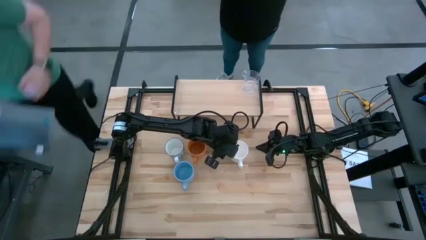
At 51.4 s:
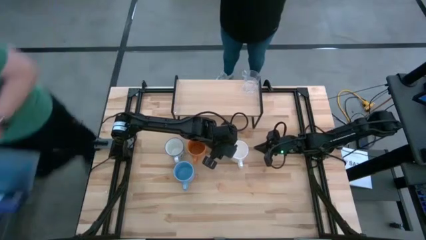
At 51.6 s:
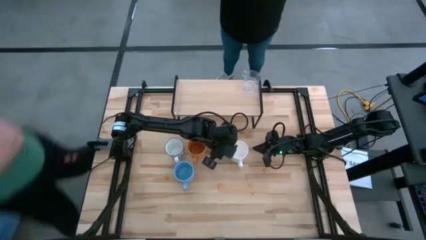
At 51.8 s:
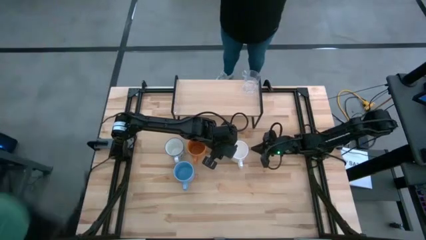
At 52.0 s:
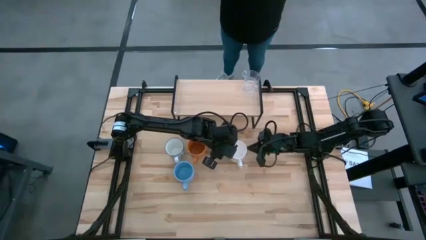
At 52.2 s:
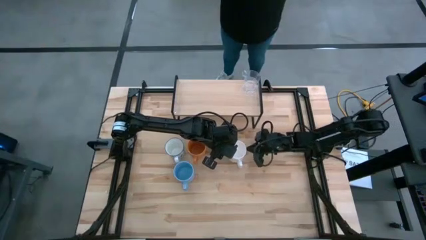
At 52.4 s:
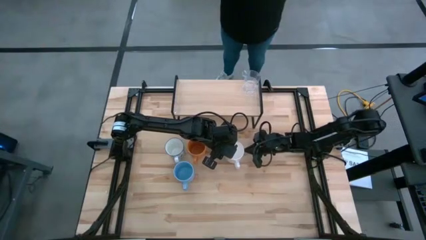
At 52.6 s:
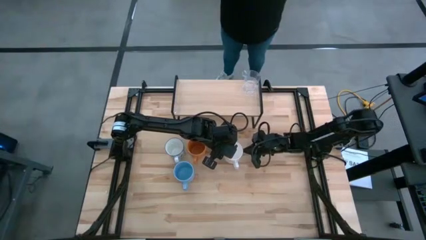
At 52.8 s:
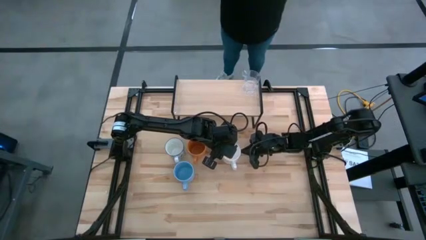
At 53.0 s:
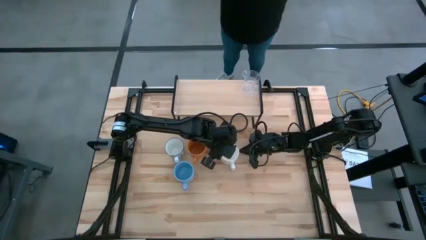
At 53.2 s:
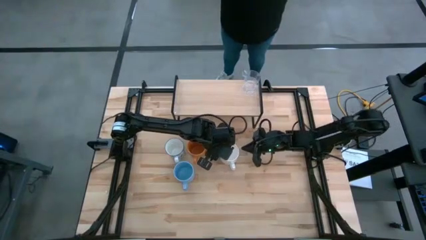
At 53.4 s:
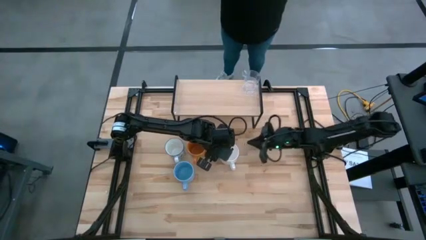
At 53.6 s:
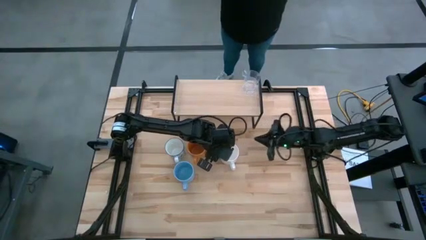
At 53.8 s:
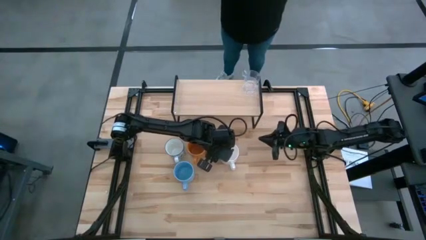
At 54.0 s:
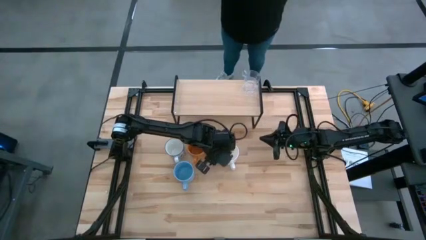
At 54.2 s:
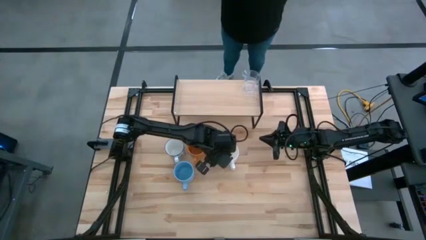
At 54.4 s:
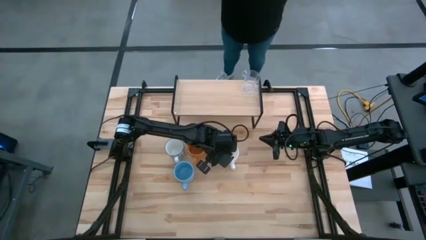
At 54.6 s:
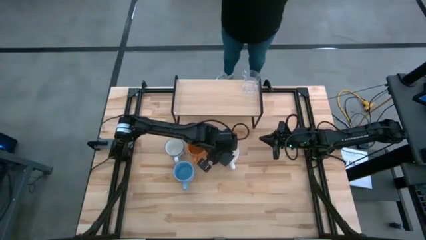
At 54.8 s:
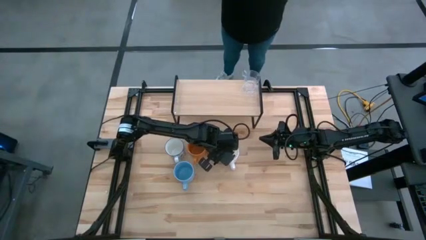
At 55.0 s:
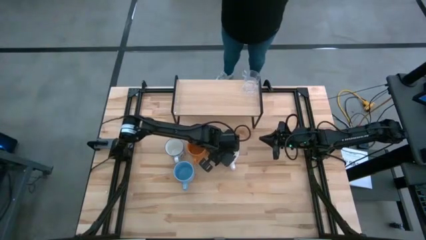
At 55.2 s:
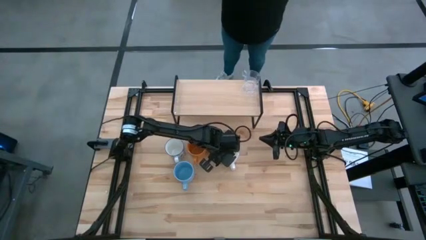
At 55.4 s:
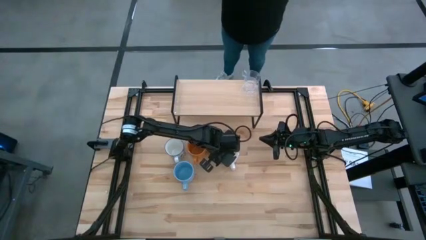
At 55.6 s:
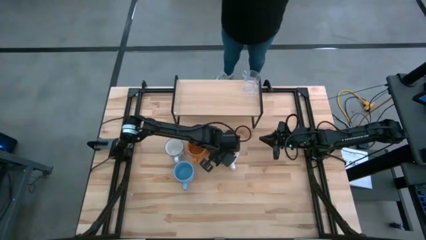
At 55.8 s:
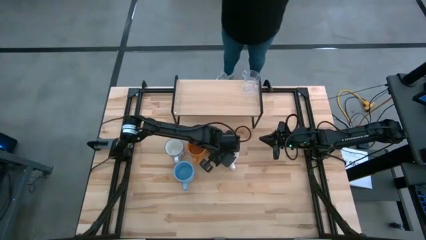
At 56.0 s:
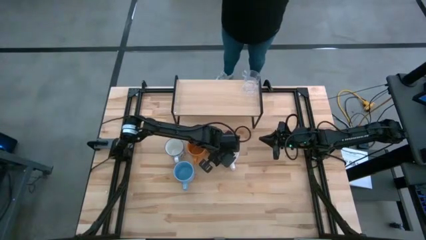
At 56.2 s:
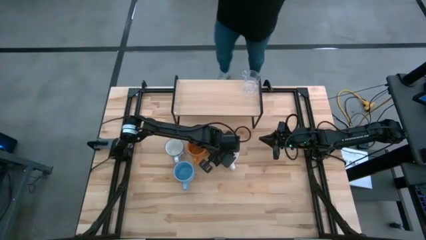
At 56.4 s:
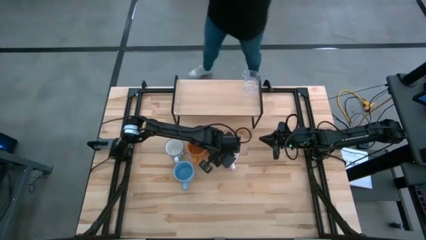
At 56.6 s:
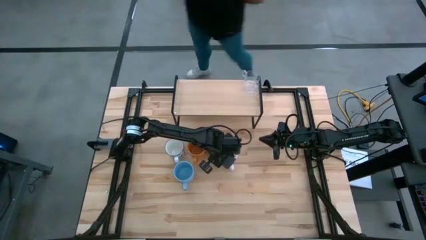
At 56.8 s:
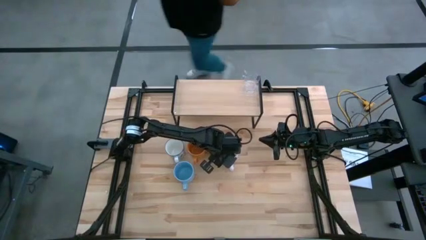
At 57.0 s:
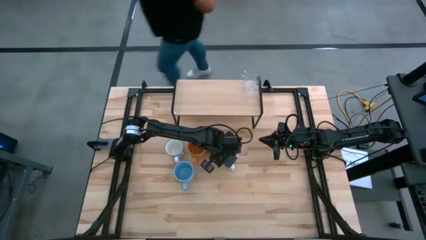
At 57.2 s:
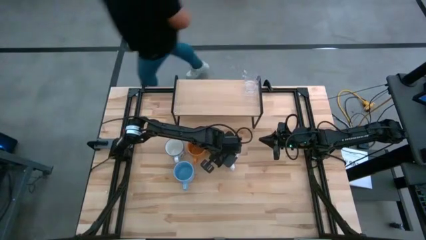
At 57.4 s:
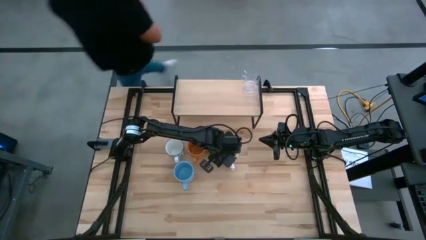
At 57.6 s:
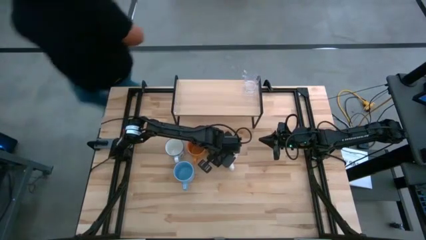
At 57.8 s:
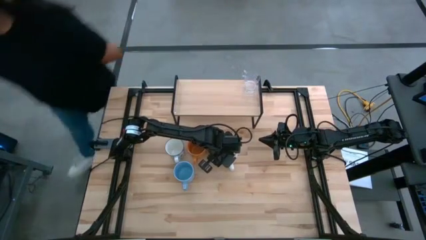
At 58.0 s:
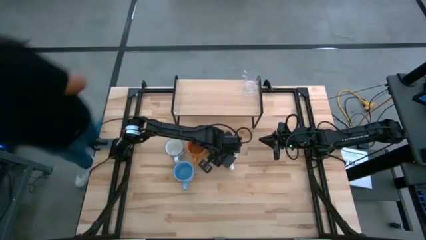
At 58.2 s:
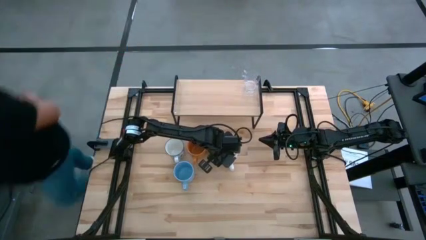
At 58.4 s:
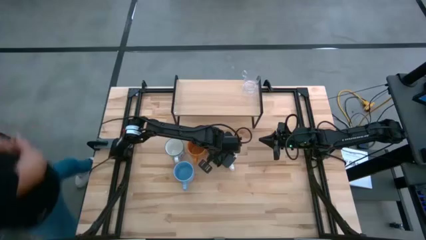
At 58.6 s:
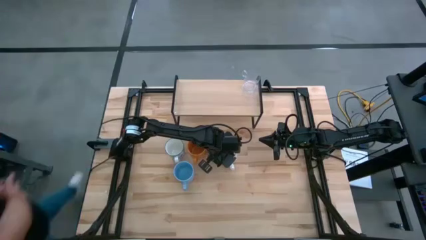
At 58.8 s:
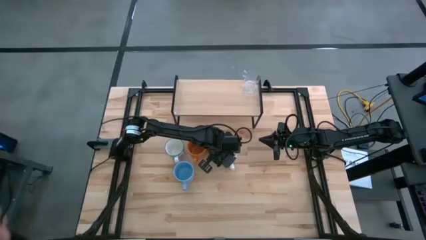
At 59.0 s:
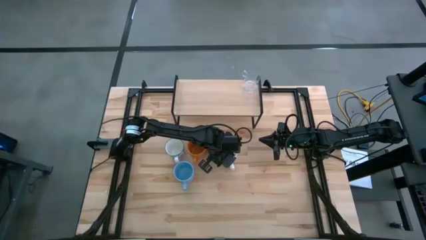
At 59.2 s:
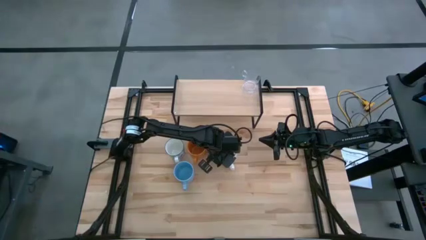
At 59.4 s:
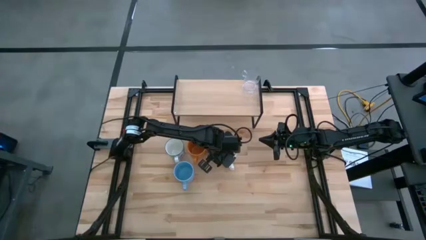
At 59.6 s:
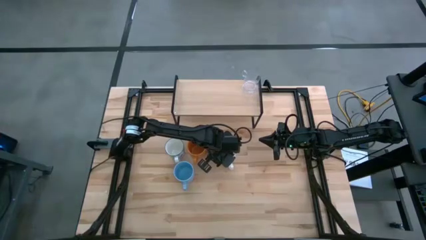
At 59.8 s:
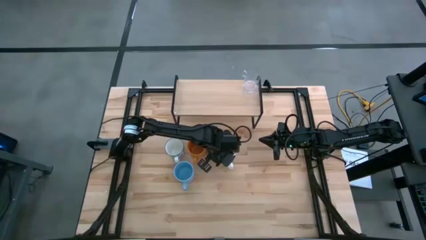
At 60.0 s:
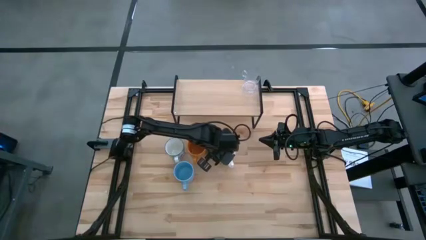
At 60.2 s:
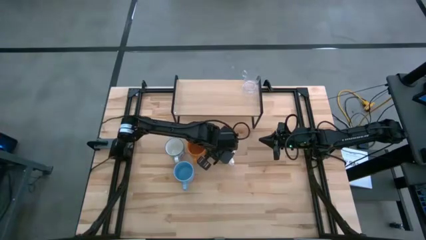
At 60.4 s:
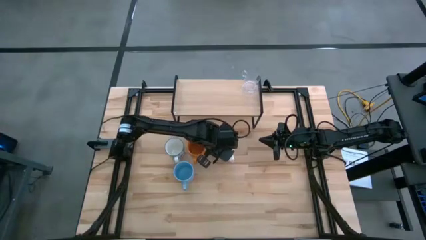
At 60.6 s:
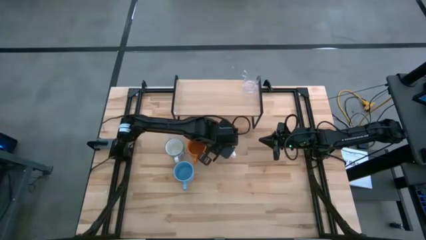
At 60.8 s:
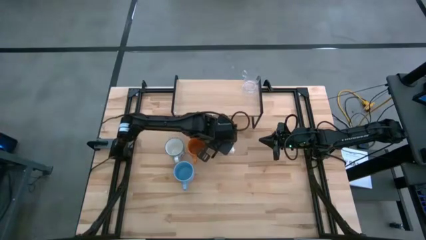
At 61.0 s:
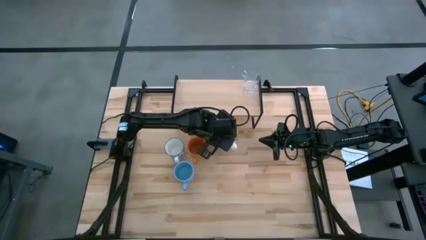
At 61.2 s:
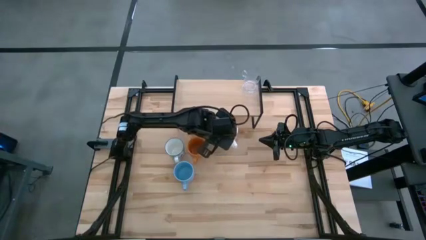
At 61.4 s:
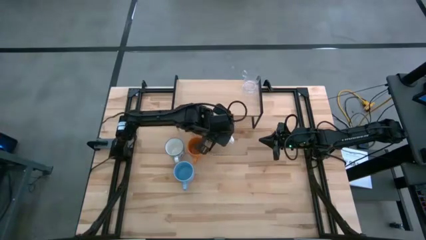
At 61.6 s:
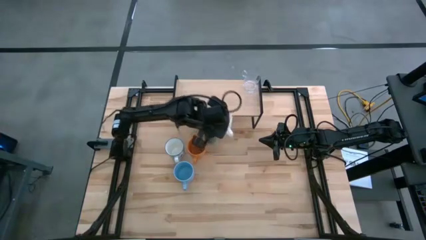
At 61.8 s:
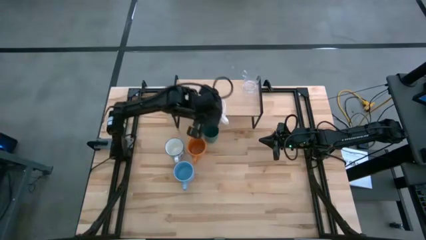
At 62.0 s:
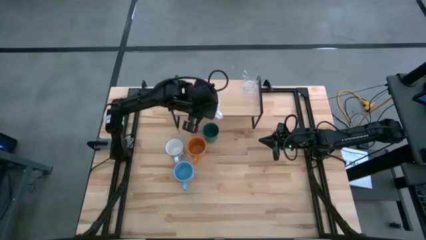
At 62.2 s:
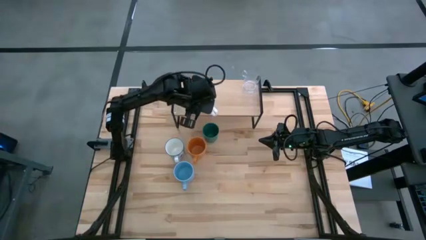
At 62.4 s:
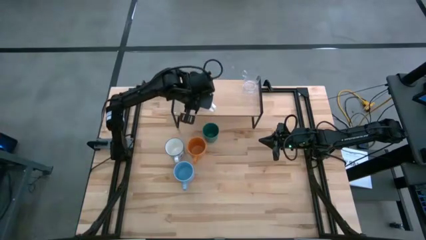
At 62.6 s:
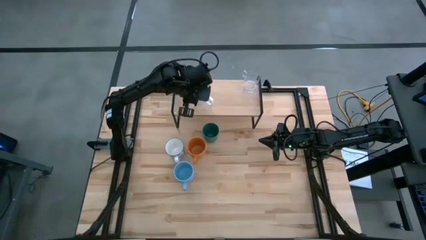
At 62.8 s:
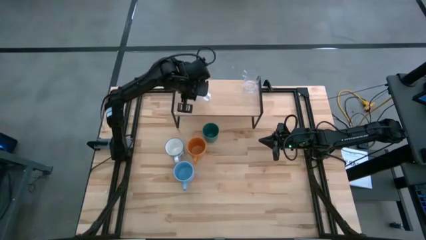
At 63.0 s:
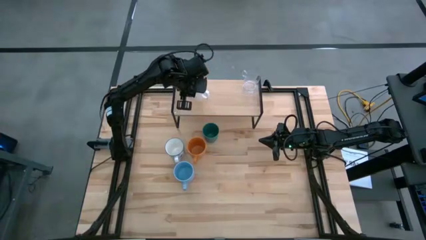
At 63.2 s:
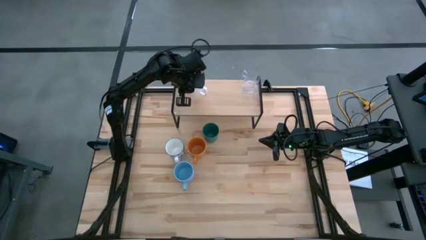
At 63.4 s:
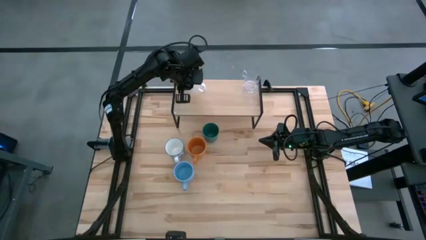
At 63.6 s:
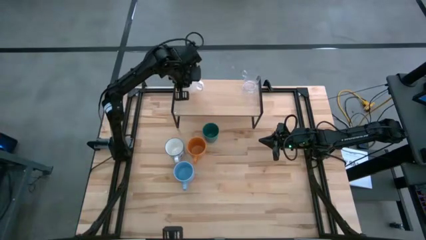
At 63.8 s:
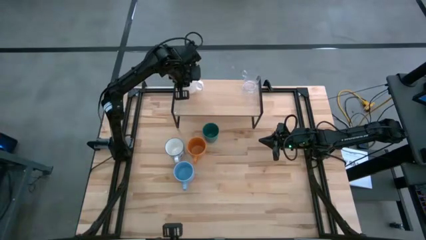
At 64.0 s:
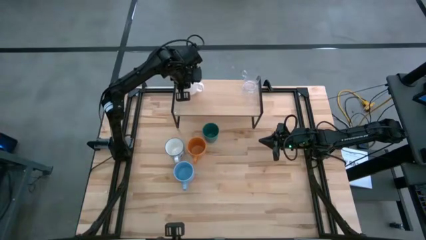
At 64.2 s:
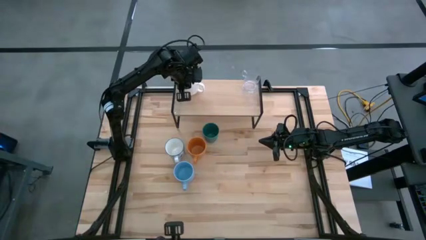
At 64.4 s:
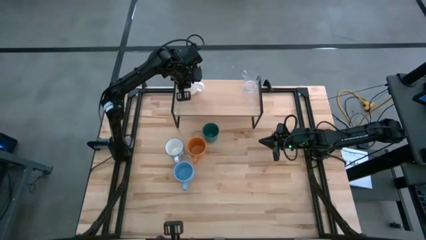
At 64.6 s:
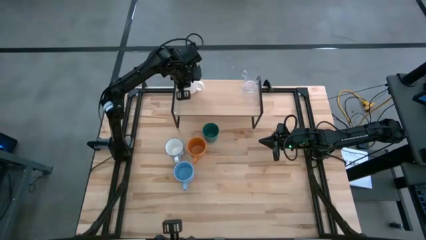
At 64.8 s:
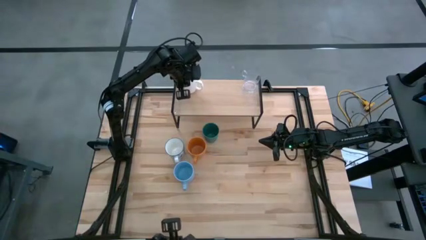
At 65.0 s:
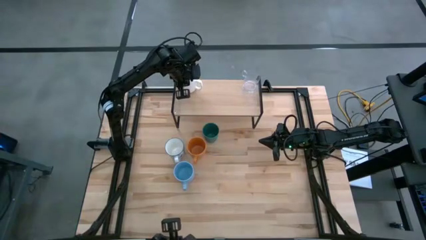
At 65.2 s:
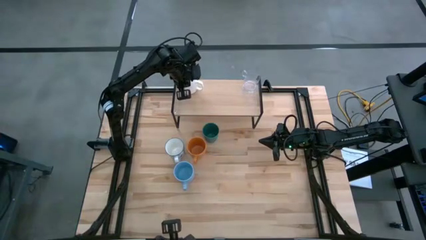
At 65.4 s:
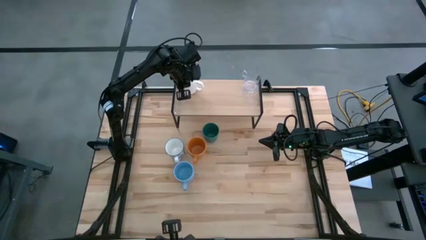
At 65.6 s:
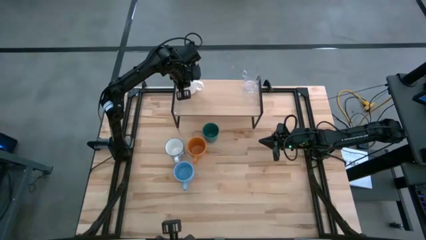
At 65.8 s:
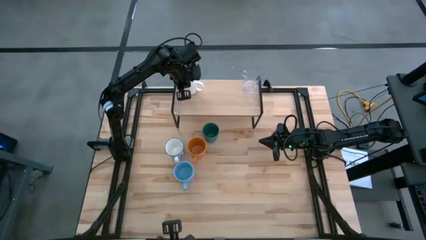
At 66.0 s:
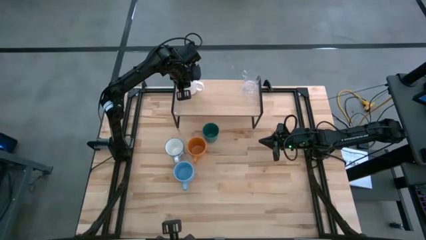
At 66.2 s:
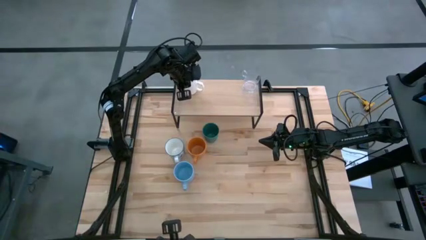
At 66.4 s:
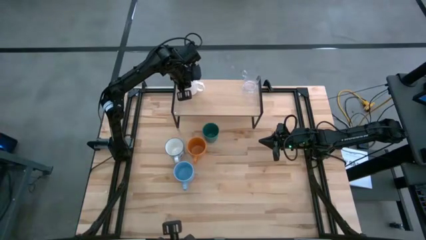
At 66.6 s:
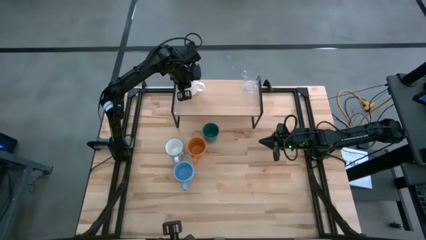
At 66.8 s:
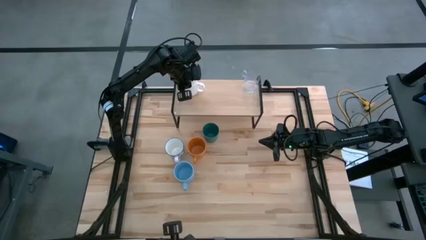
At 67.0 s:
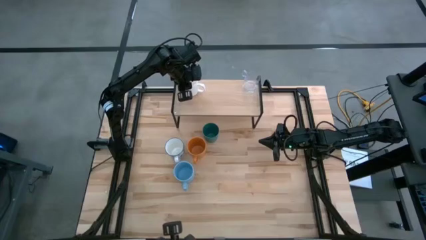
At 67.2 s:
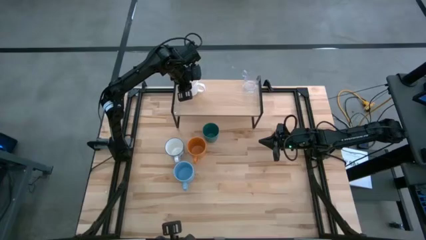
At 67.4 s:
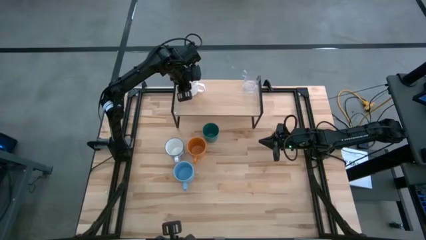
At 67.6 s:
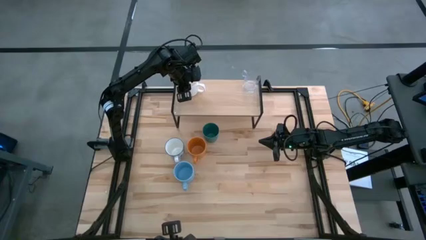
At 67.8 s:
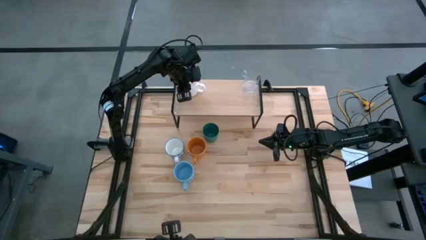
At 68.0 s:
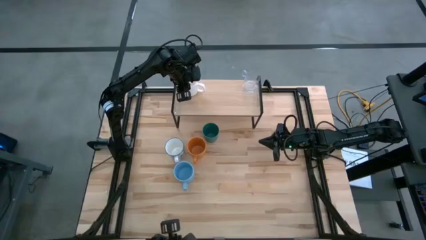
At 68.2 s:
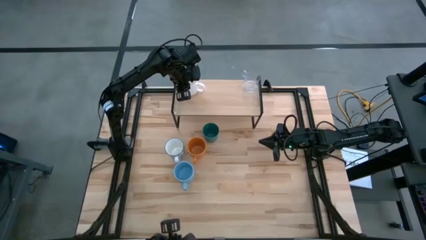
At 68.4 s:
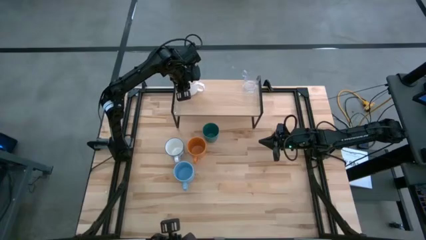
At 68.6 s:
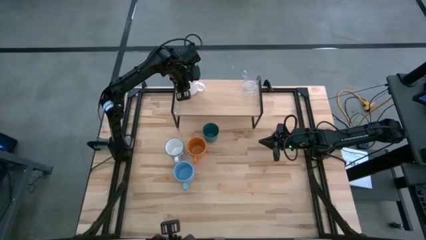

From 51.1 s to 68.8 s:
Task: Stack small to large cups/mugs on shelf
Put the white mug on the shelf
